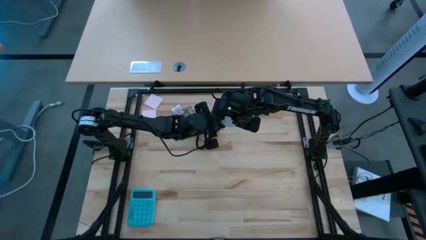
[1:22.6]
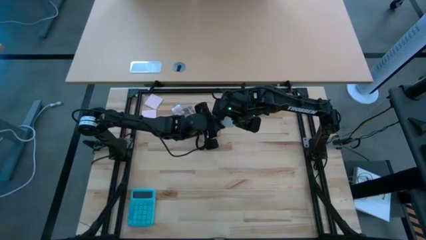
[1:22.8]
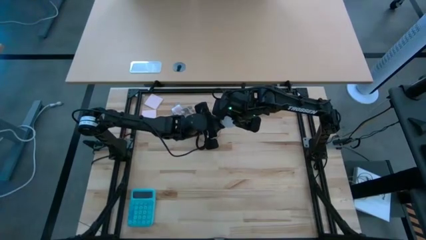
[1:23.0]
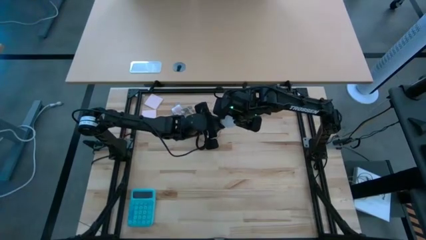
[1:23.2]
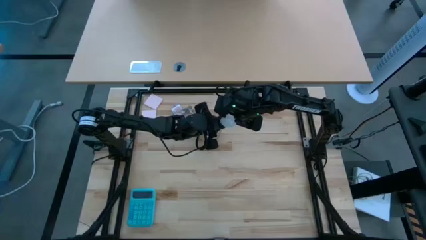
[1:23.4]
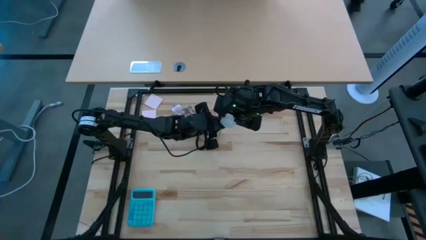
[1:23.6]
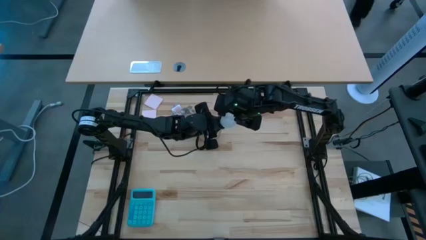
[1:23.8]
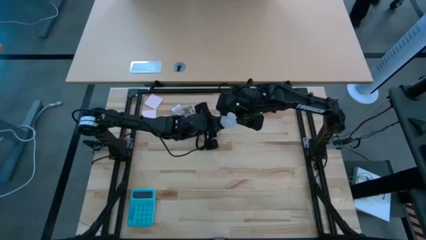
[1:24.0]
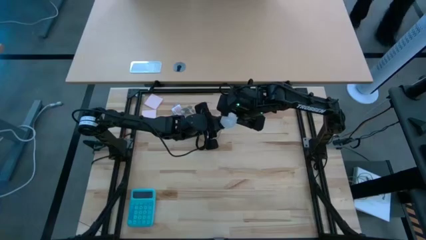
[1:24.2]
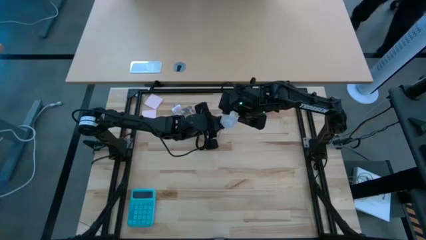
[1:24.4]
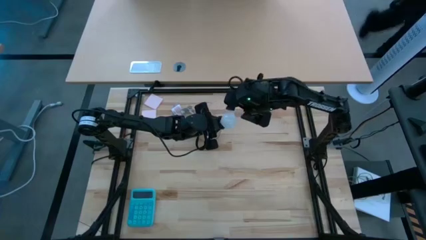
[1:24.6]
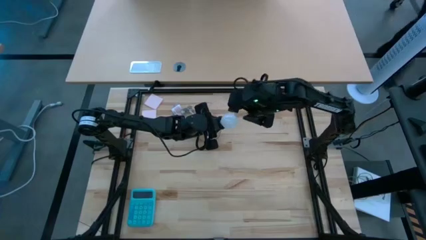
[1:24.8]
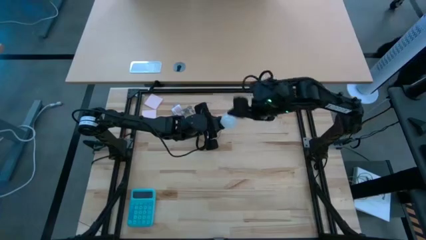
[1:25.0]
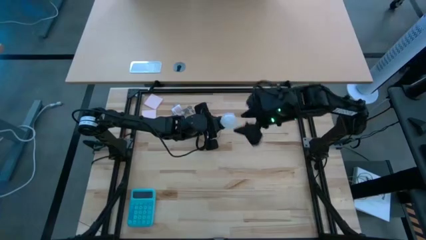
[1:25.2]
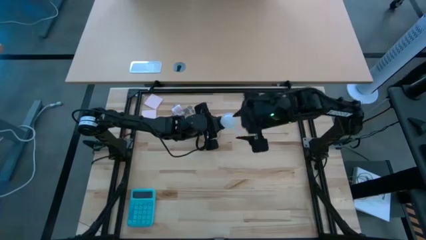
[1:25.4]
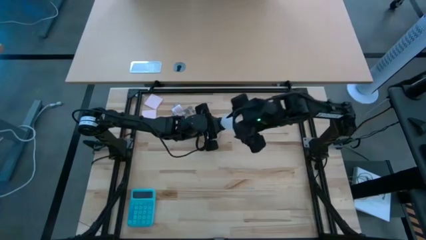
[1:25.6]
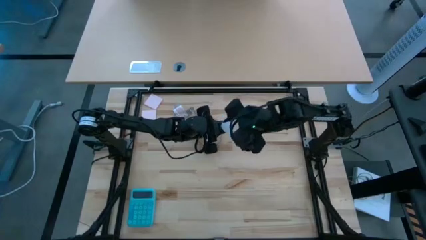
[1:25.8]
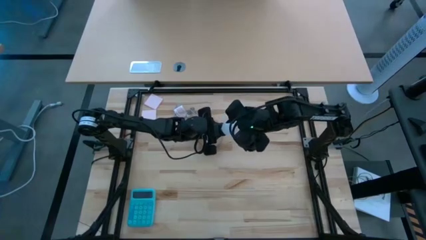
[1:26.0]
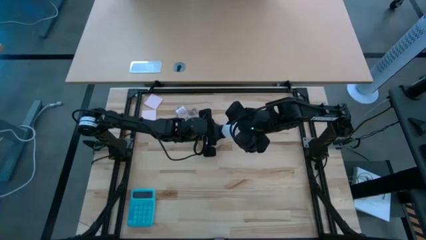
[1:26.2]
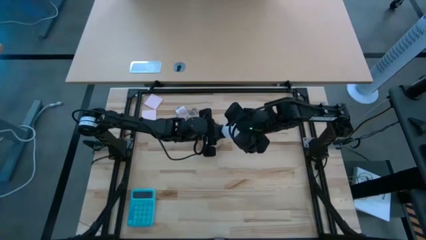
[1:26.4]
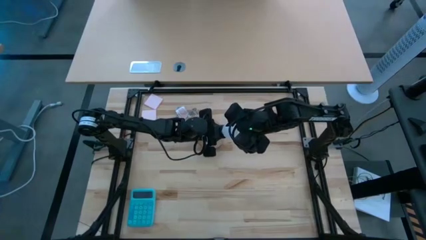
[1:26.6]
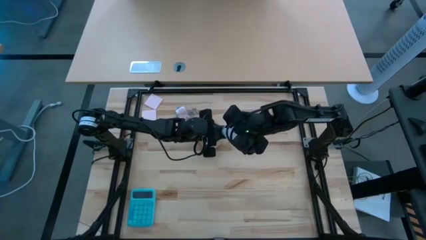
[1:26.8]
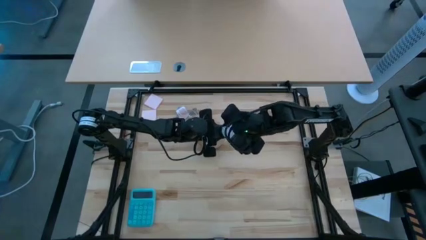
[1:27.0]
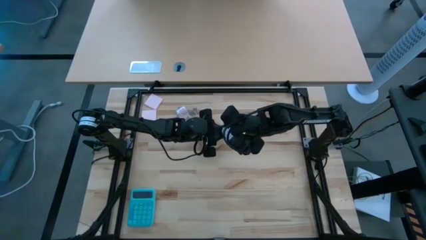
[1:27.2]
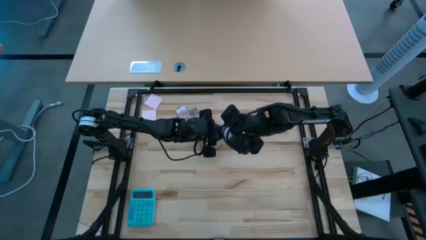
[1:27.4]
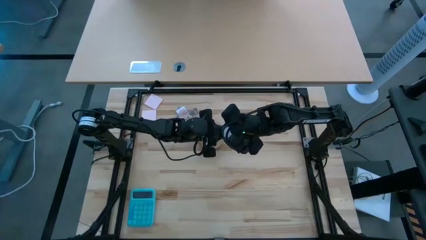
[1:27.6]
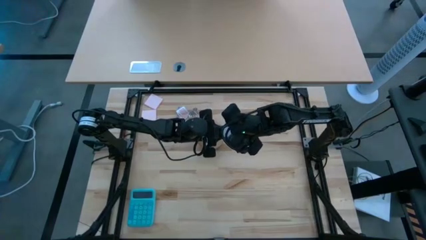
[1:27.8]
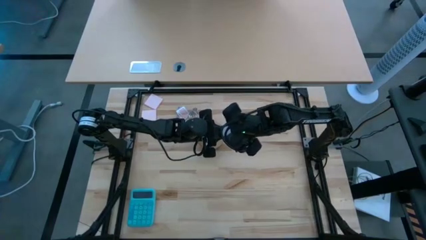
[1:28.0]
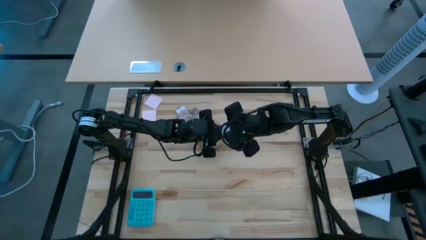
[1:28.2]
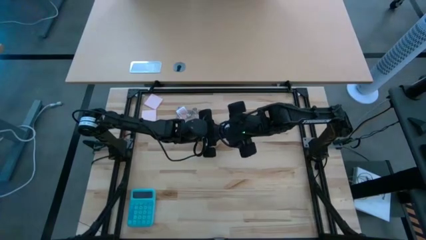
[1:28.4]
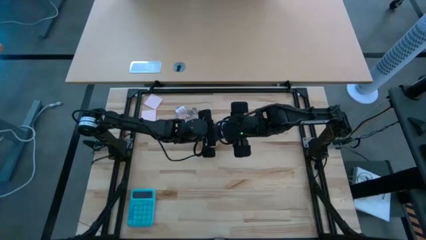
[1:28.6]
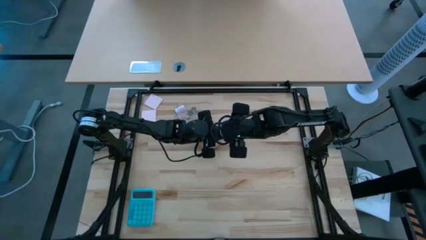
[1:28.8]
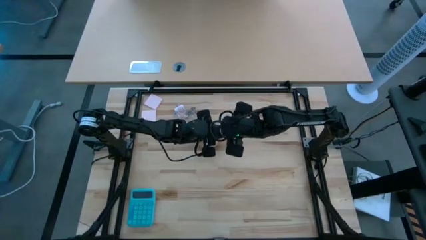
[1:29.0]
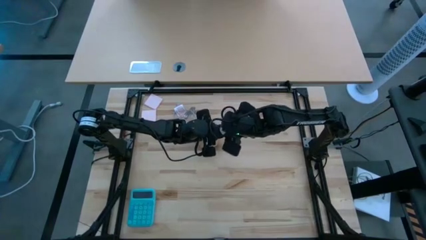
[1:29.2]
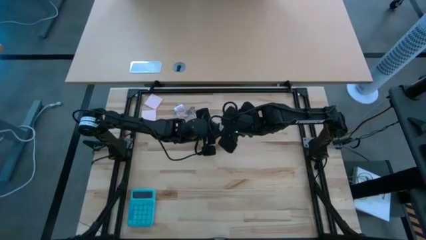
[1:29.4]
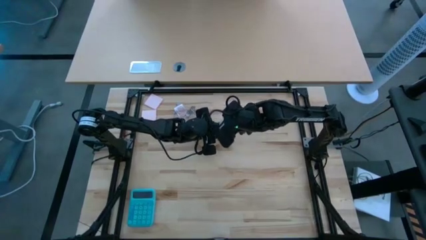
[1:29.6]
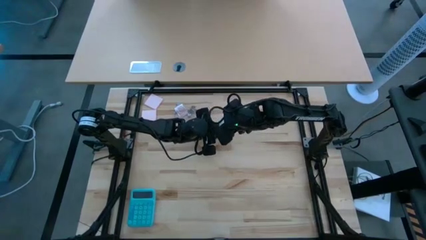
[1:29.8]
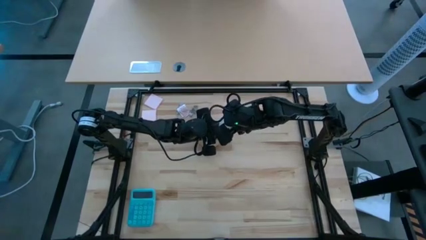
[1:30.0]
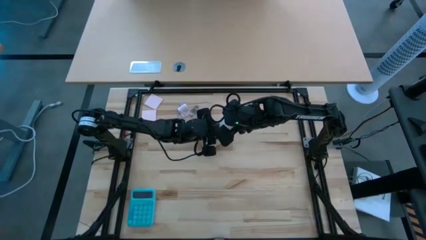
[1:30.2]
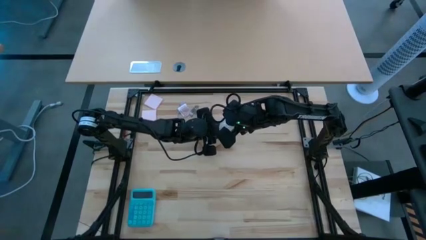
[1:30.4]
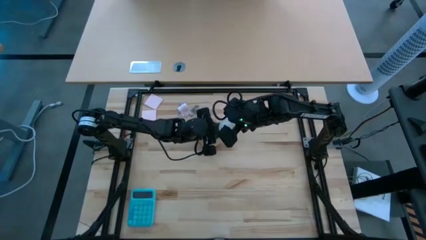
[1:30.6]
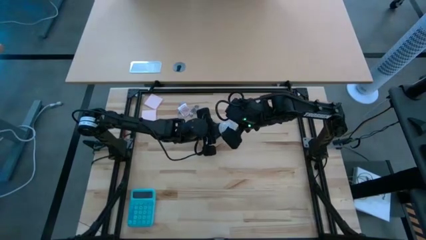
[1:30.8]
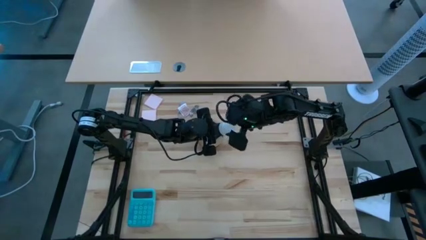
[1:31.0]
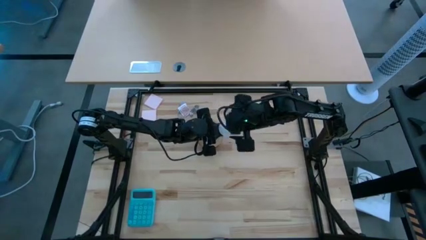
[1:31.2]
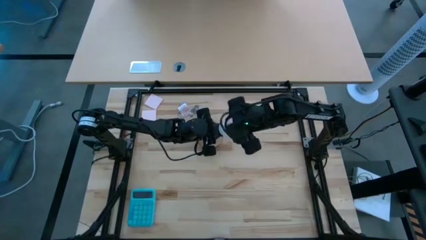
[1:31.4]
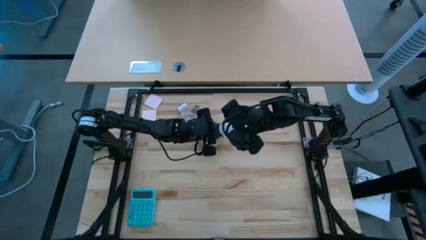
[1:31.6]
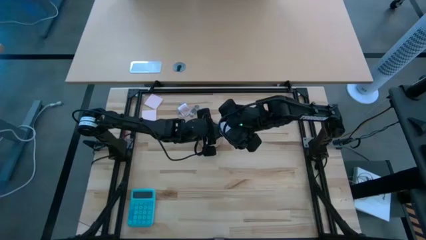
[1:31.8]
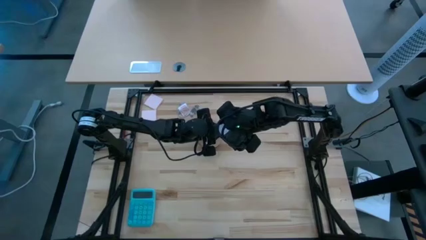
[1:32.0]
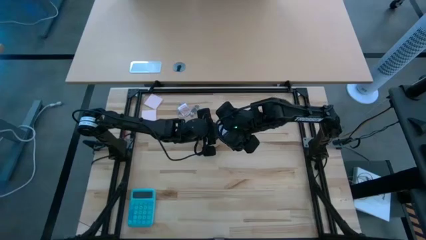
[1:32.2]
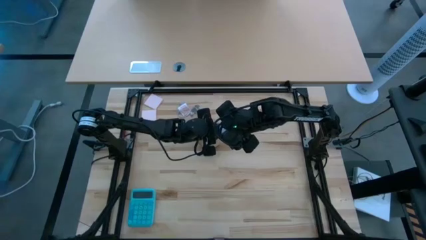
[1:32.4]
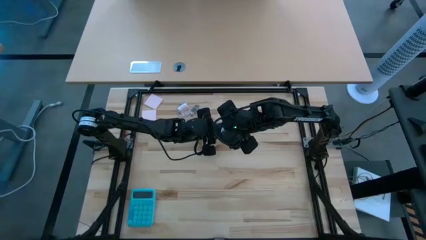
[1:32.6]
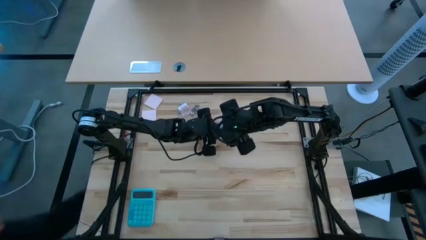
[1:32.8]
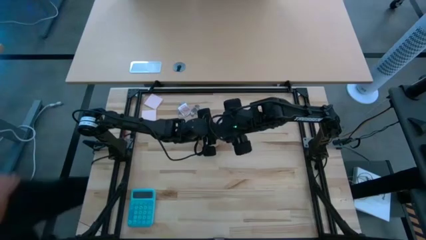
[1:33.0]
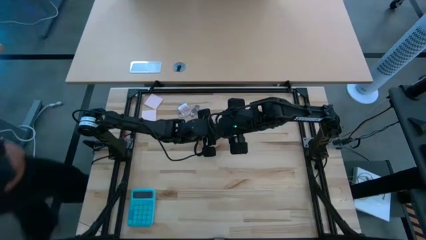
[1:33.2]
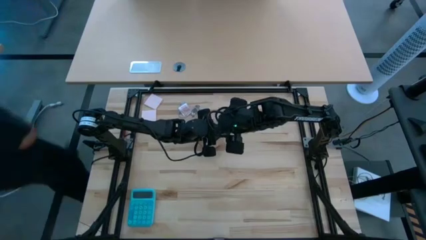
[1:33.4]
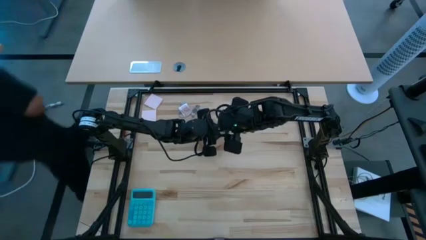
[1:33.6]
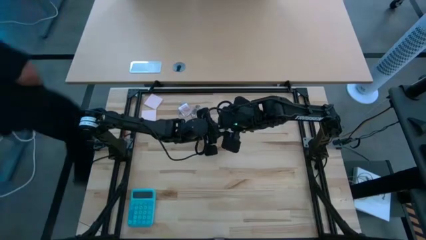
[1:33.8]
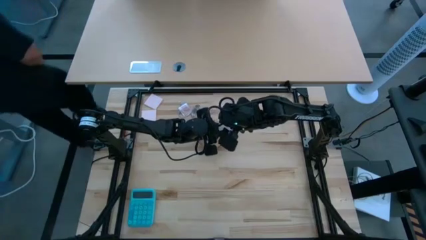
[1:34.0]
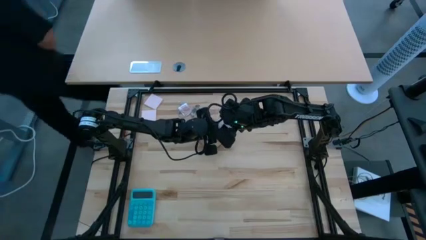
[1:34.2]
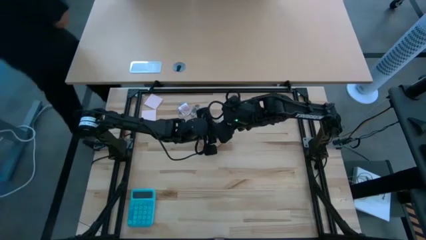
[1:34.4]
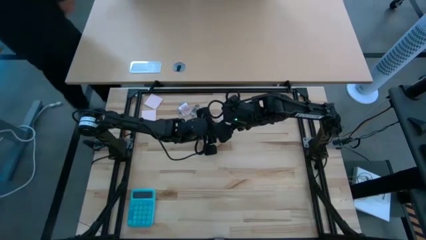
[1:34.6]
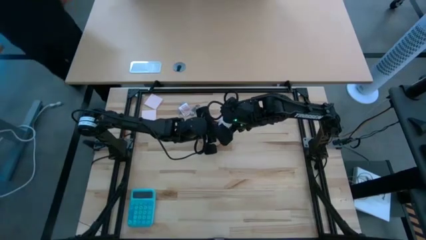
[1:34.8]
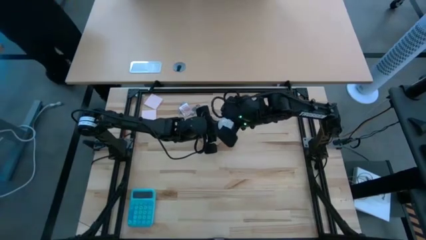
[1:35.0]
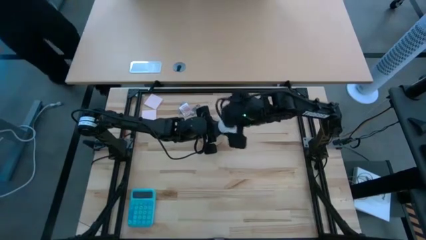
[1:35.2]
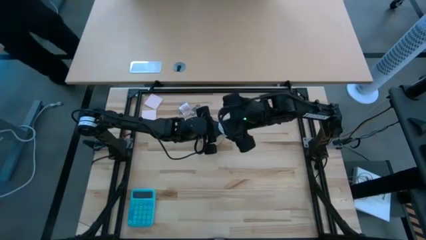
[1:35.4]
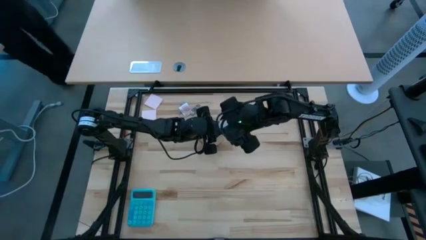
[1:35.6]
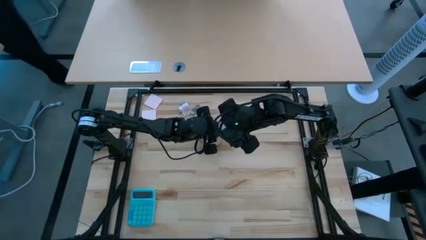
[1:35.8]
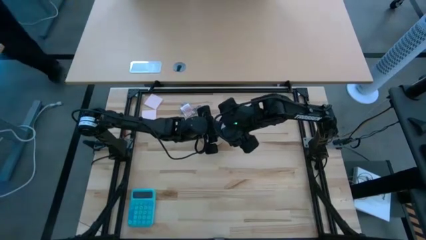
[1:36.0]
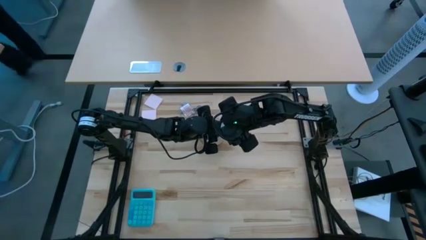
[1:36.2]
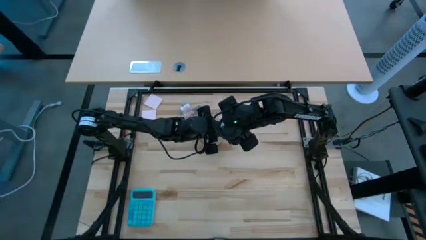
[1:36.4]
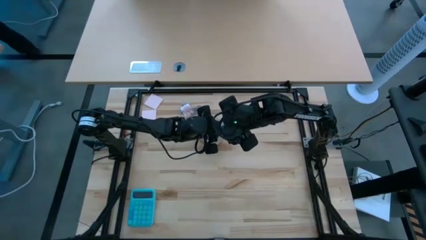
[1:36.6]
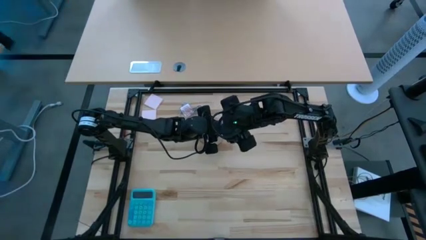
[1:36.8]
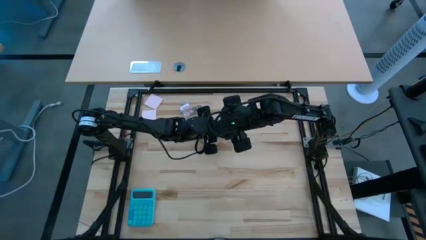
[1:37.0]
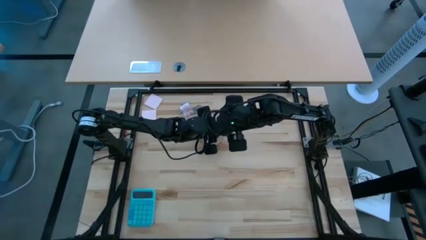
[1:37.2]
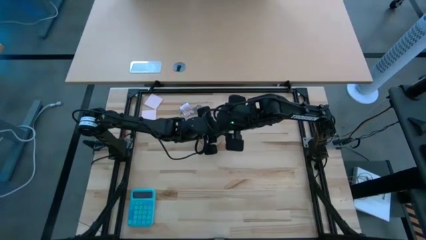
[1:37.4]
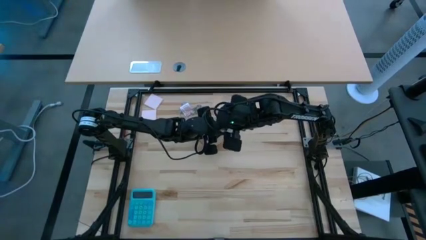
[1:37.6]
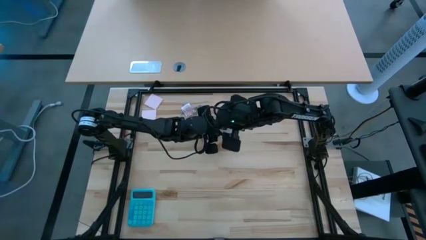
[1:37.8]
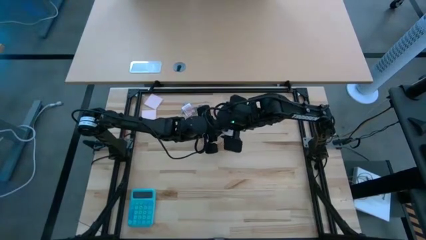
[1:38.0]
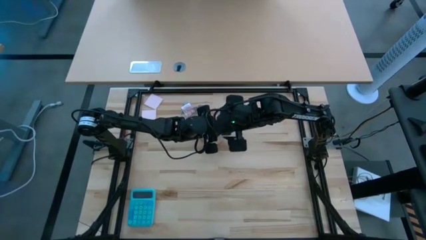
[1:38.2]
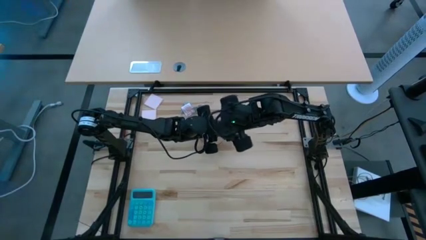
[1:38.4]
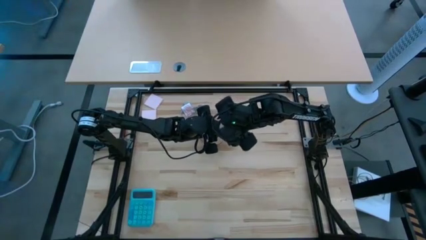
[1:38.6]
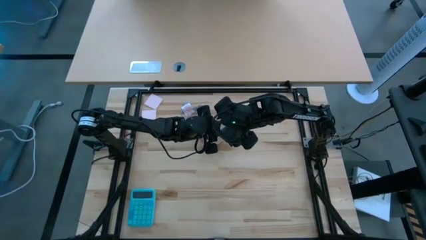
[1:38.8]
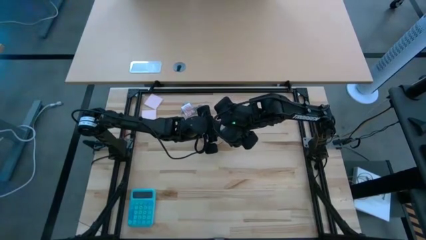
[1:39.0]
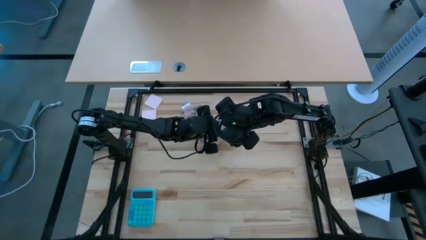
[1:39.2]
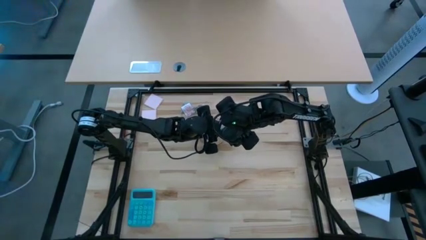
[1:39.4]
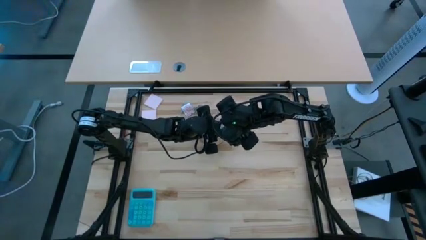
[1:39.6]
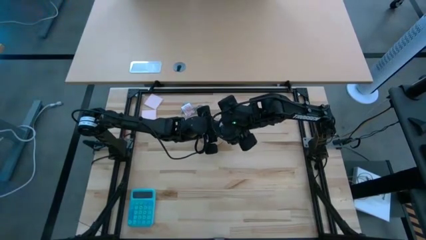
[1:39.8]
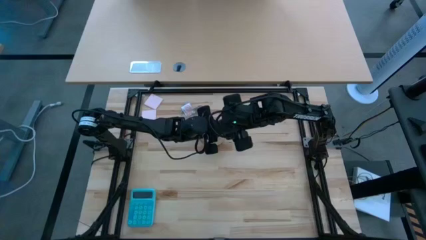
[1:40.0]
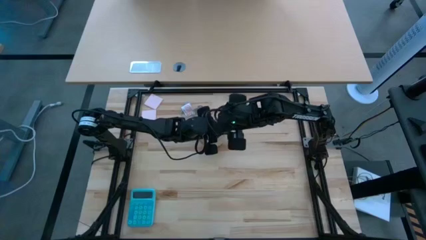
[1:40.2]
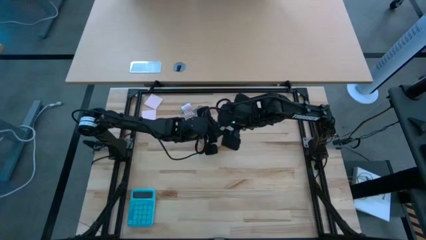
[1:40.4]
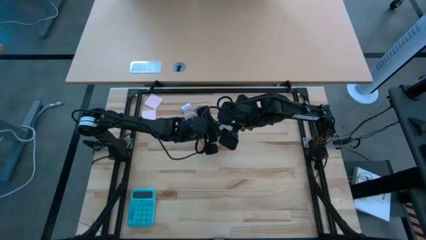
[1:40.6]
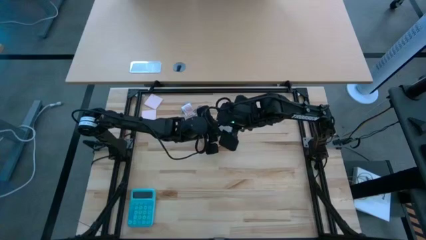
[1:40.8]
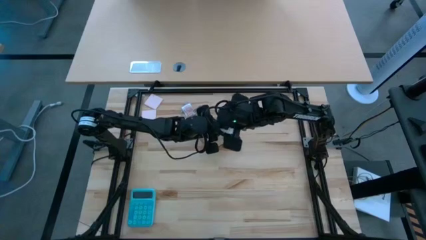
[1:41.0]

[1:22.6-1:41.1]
Task: Screw lightbulb
Insert the lightbulb into the lamp
